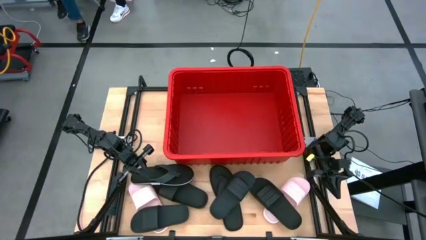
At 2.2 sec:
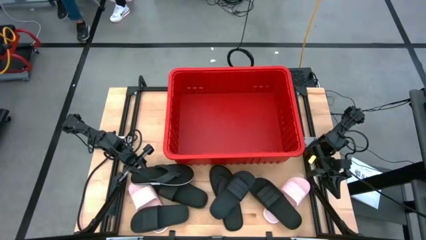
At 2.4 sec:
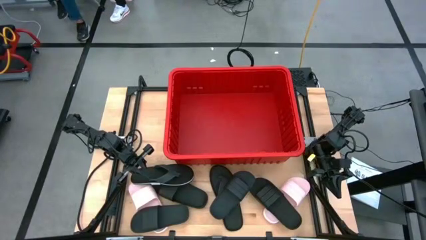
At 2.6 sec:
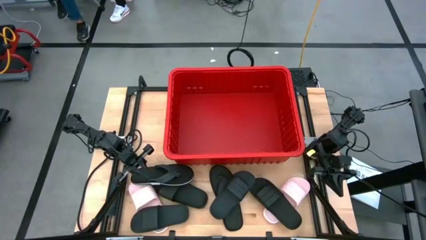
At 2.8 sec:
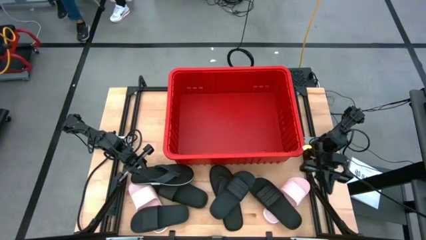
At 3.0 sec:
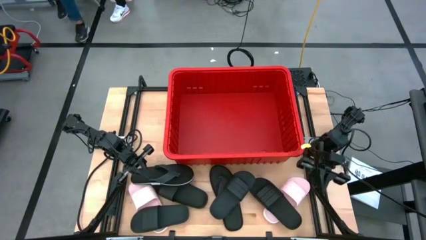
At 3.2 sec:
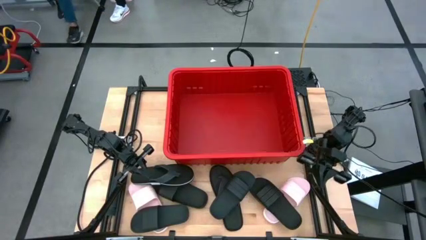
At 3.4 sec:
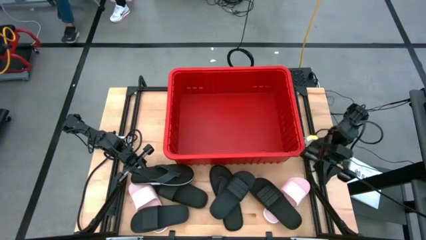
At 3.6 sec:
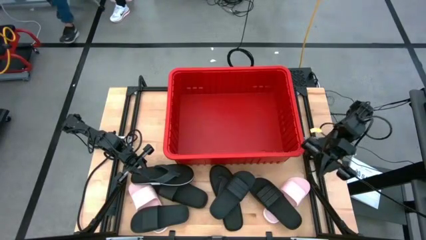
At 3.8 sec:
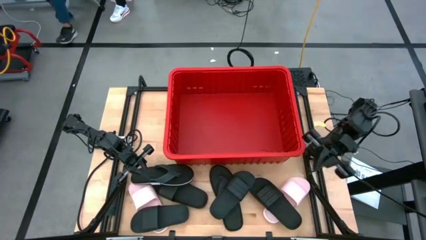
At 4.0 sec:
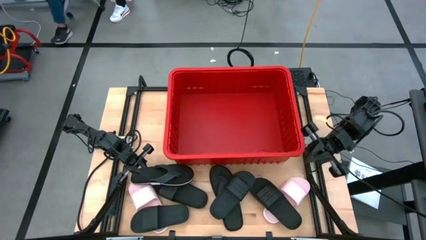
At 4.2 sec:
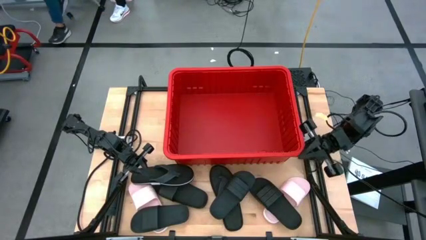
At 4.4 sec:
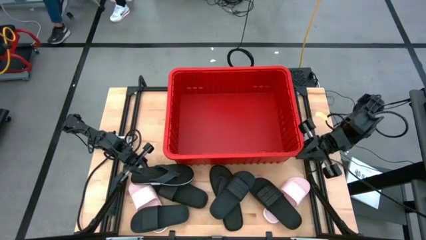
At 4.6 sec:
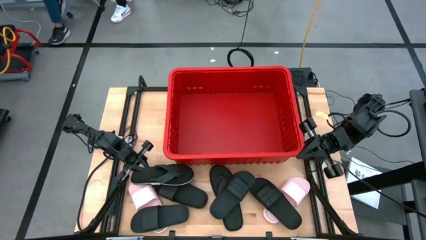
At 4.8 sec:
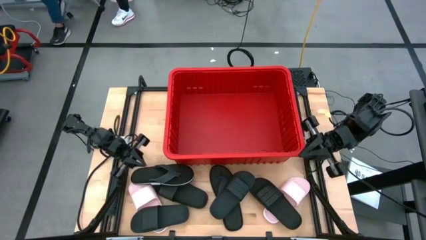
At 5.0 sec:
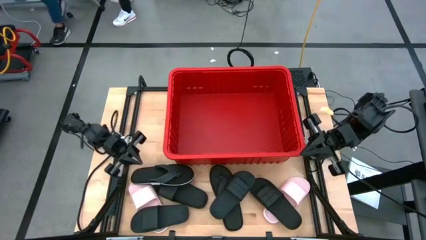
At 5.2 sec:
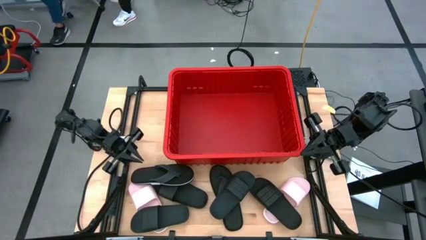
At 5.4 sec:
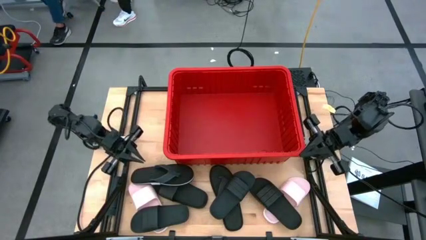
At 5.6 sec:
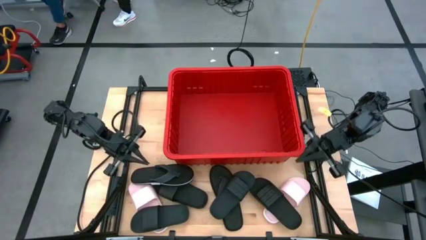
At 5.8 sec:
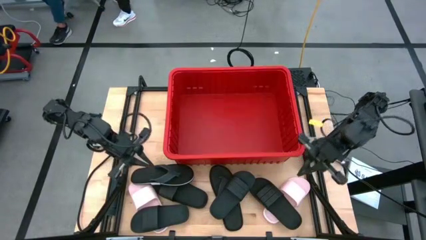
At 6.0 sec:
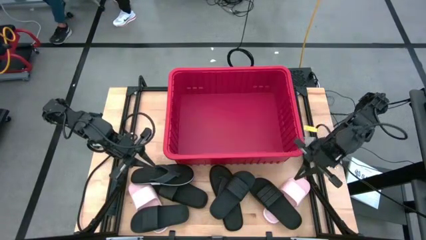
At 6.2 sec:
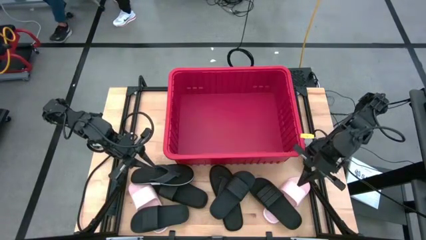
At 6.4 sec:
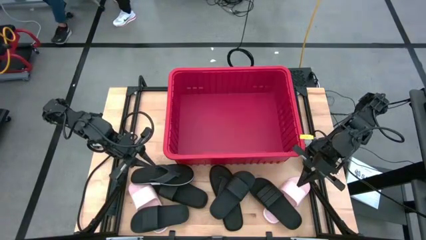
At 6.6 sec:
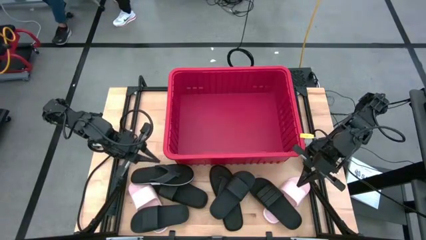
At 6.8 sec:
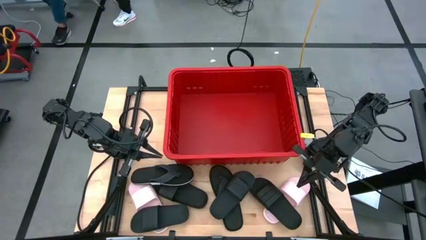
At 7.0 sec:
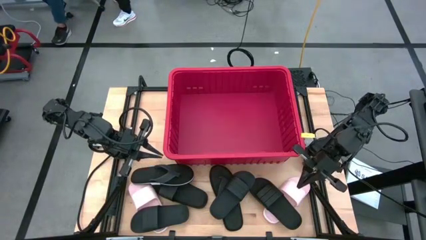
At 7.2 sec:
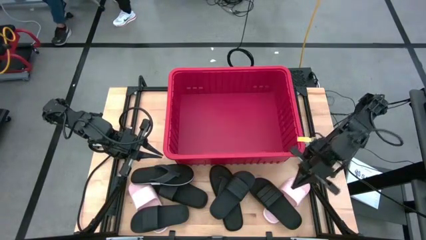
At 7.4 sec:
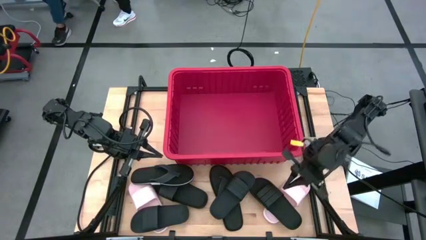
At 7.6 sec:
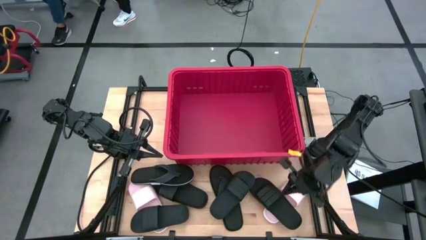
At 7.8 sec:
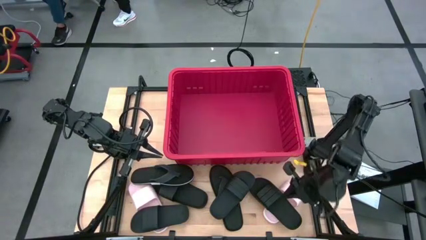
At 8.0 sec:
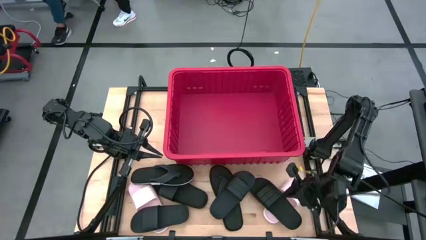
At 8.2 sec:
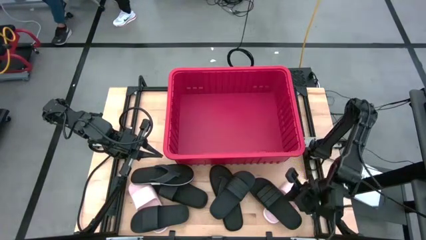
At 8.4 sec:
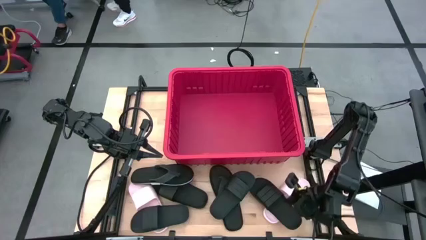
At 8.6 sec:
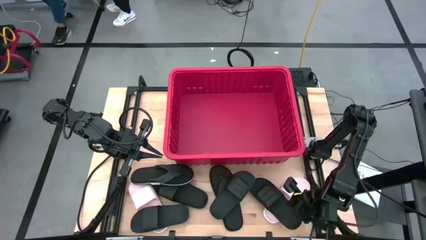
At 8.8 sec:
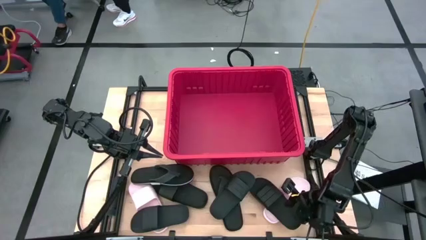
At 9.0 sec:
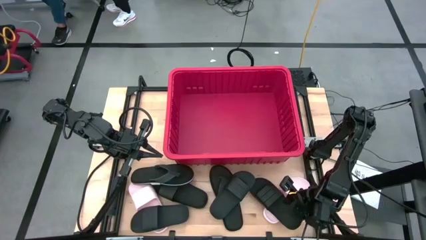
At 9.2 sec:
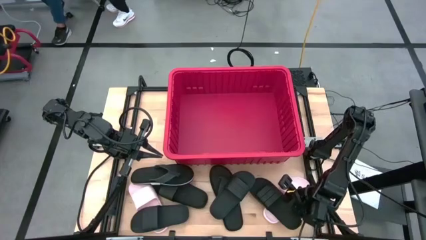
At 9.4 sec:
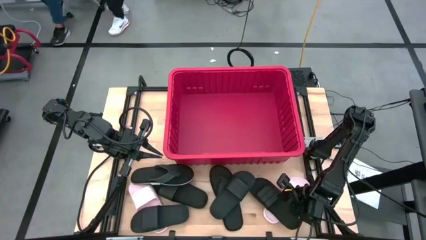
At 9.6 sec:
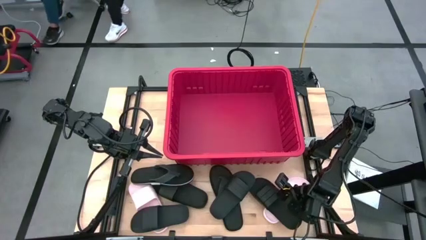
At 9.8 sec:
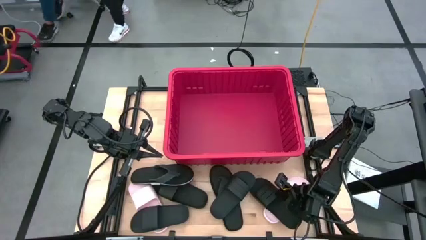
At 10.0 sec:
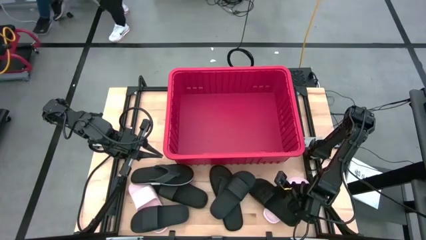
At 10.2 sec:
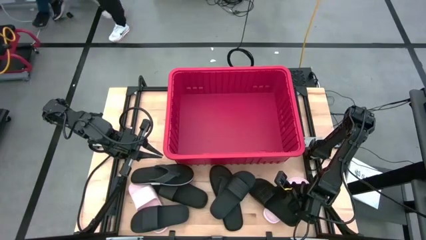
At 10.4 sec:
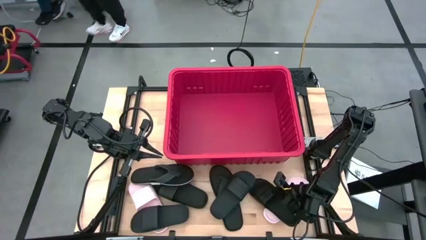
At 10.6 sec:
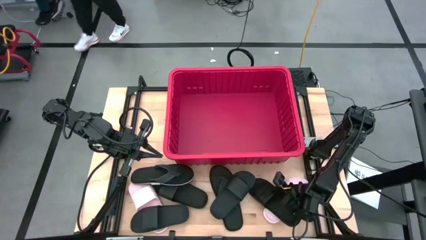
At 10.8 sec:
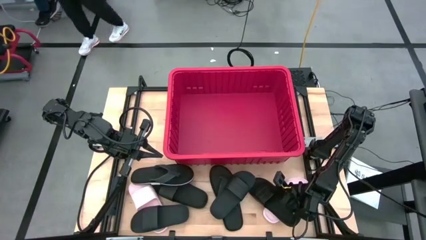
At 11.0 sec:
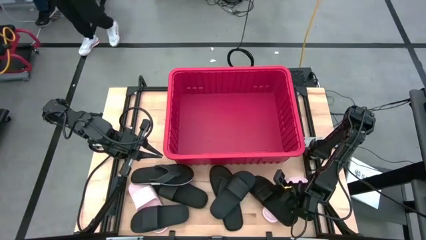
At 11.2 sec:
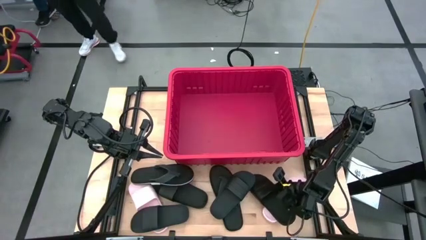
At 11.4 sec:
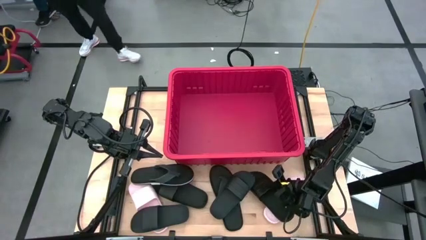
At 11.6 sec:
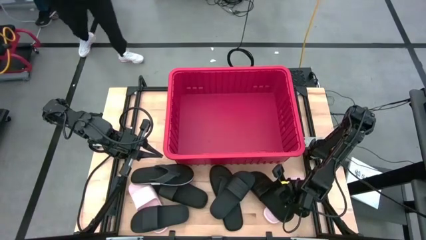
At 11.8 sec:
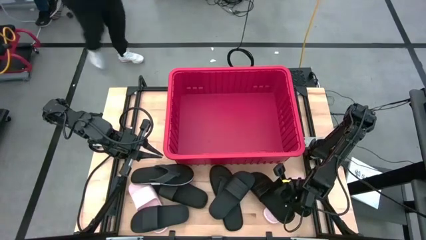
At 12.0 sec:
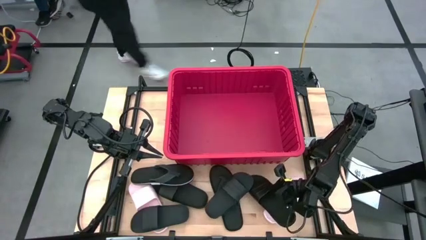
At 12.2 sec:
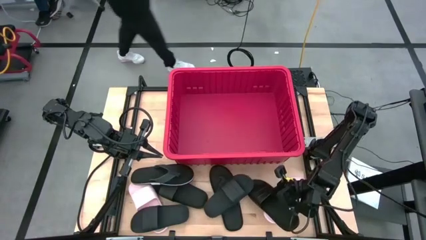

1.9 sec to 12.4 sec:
Task: Pick and place slides into bin
Put the black slide into the red bin

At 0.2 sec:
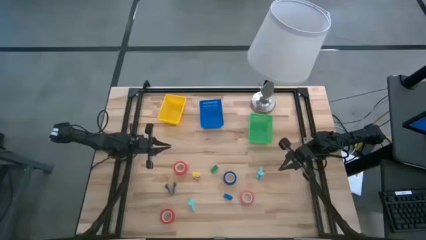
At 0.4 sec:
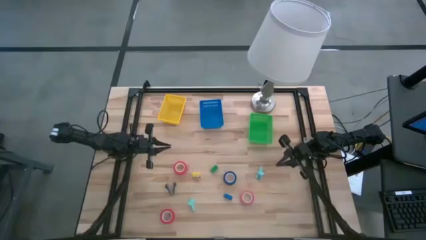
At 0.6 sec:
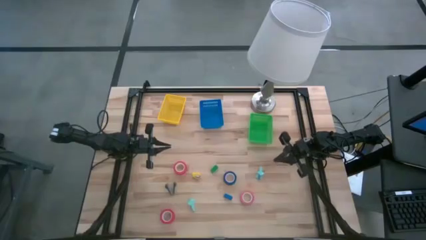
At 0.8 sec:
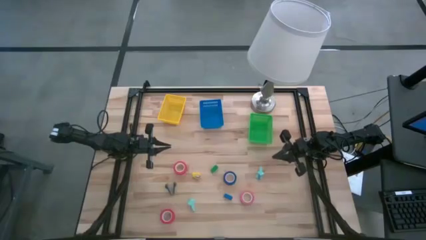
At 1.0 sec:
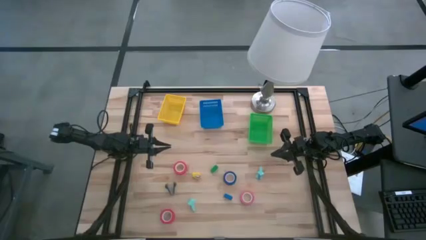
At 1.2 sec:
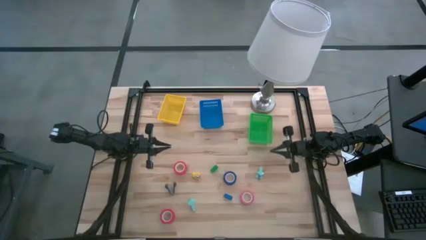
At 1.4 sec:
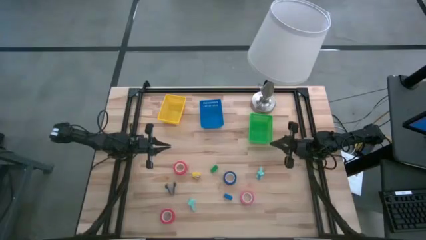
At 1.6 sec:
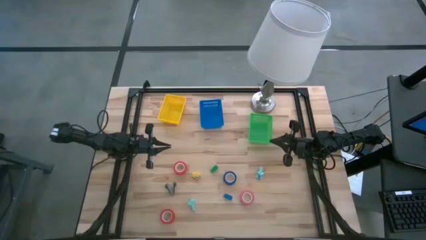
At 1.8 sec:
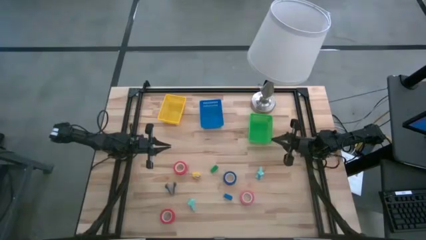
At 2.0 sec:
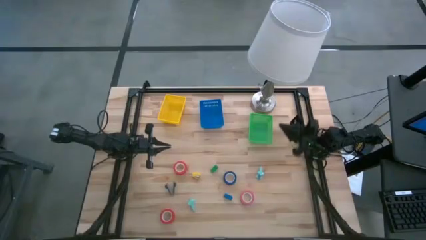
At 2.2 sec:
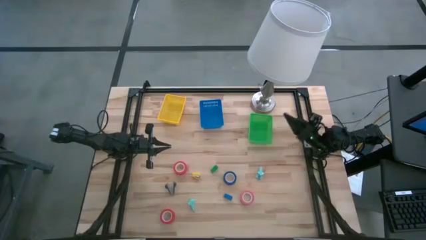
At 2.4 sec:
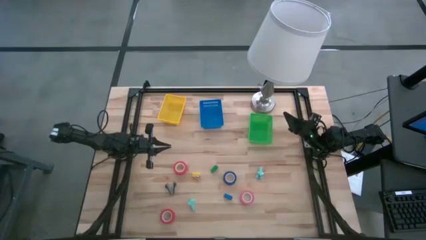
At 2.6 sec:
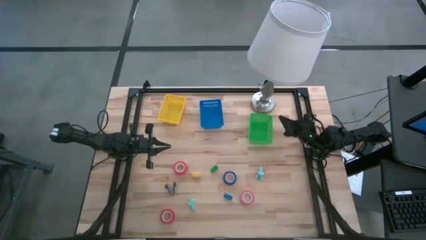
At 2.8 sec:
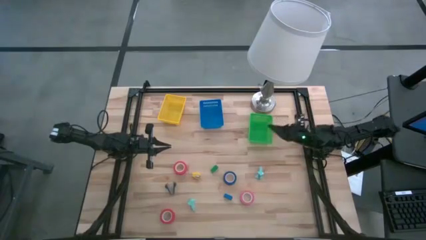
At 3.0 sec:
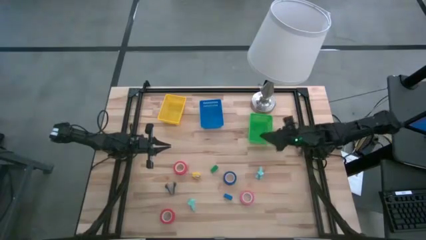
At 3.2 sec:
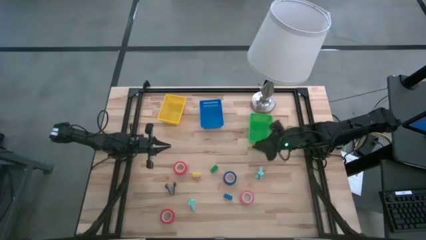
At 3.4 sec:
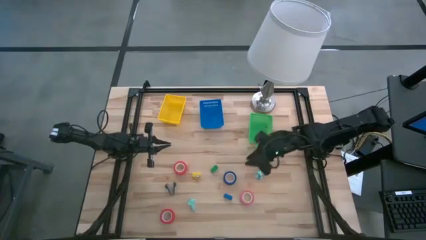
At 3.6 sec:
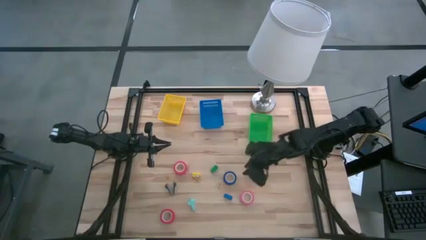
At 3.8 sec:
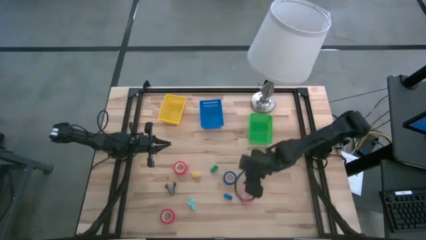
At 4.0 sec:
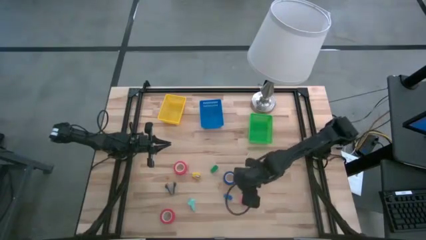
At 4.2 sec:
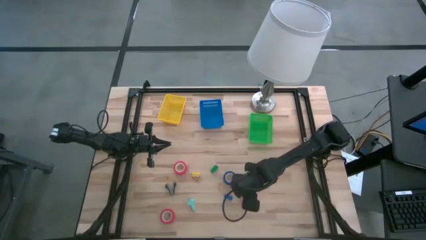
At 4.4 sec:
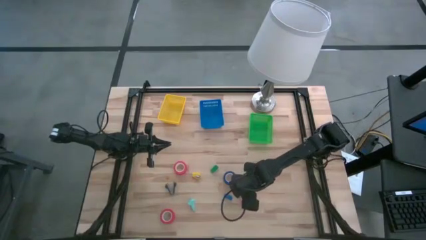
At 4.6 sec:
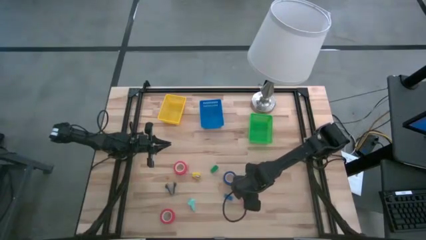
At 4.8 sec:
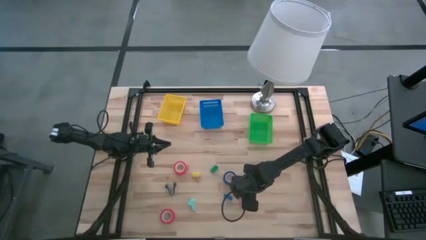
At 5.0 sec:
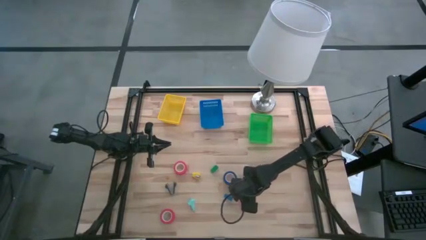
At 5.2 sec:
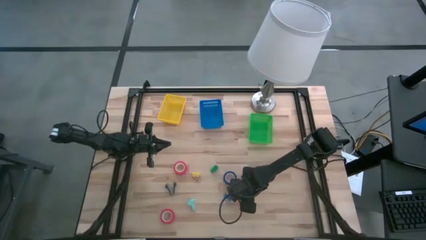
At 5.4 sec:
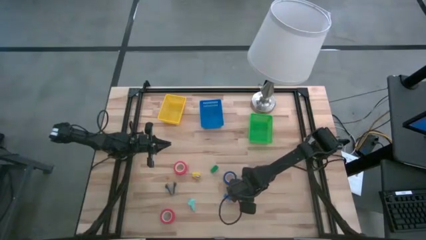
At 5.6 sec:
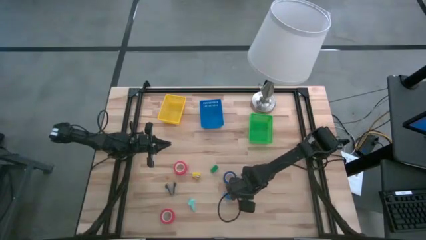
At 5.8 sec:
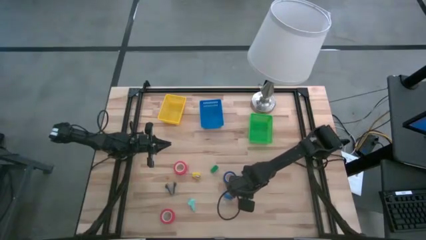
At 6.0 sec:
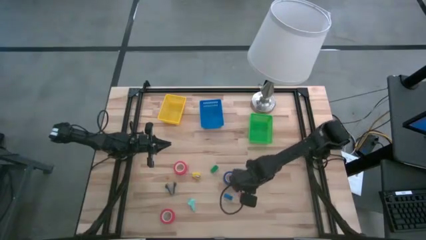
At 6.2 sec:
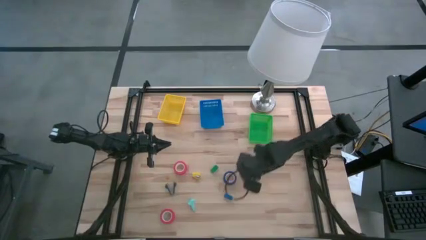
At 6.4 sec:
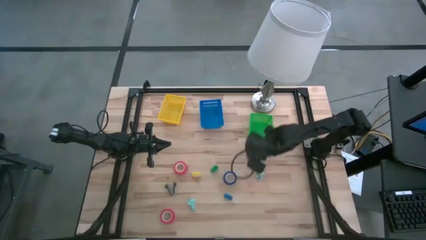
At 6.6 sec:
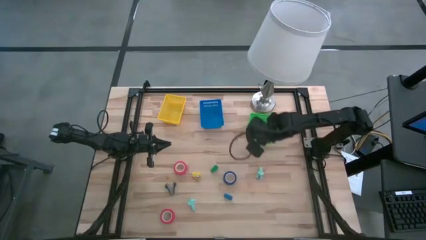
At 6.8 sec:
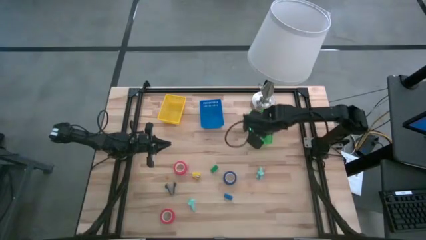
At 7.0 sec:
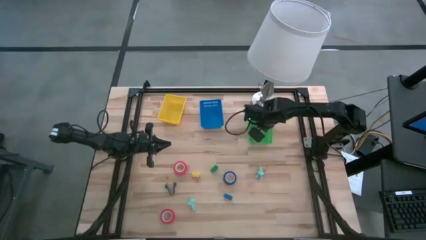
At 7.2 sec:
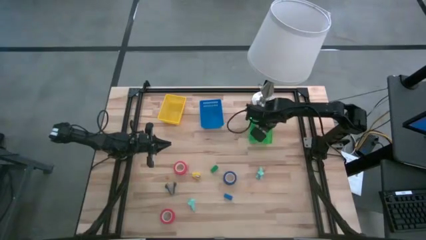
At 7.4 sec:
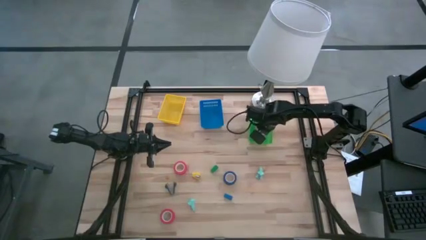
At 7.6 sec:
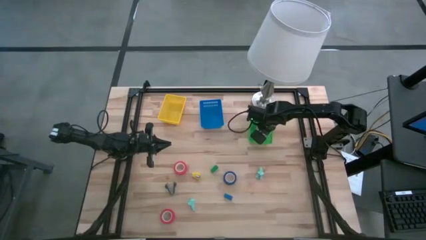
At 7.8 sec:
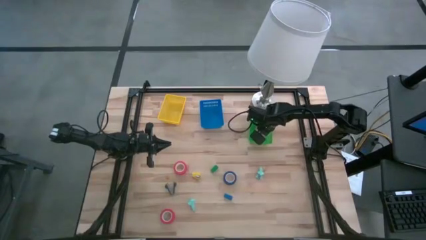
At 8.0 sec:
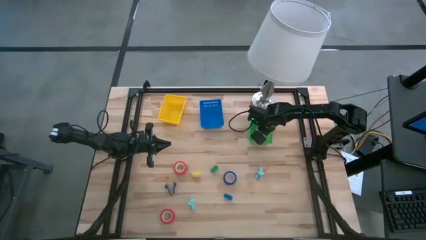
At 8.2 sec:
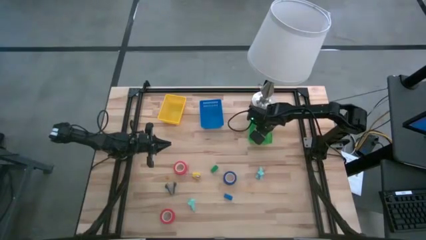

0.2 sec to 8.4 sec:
Task: Pick and place Stapler, Stapler remover, tape
Put the pink tape into the green bin
